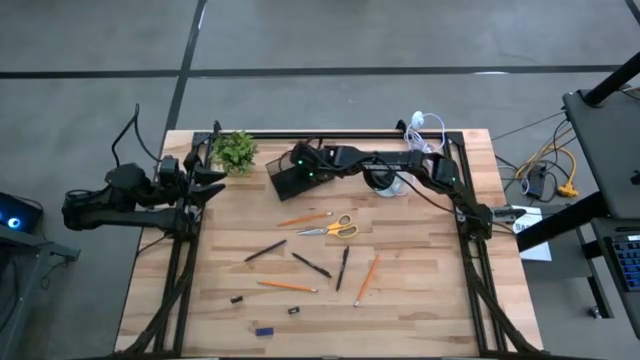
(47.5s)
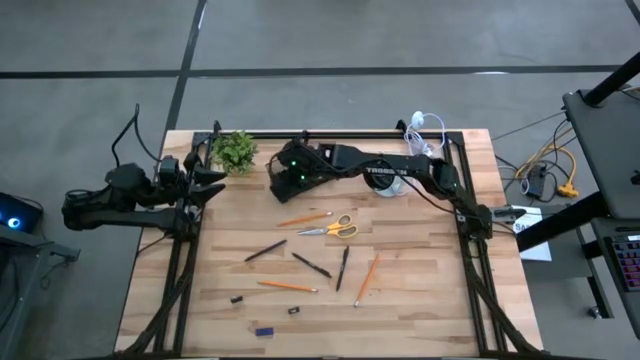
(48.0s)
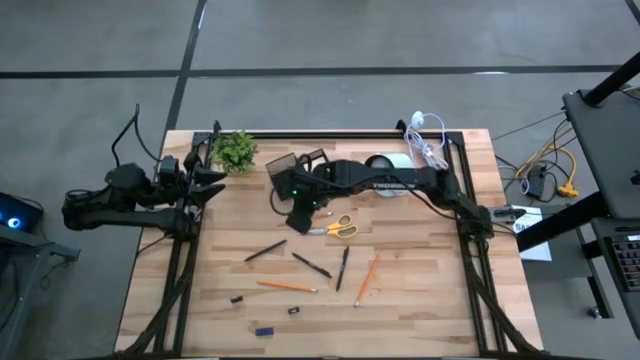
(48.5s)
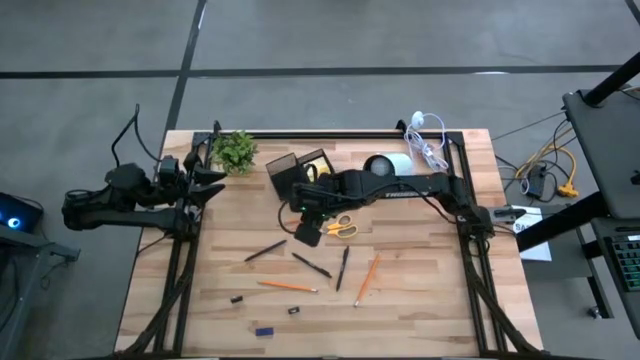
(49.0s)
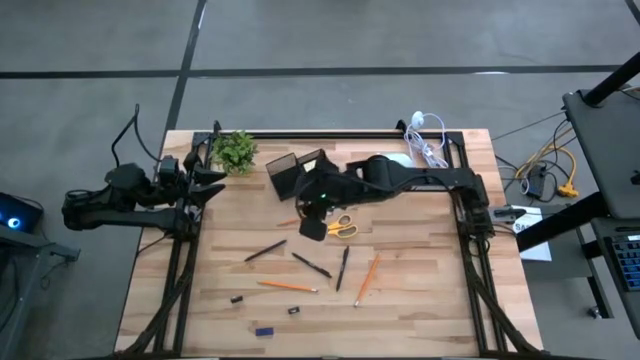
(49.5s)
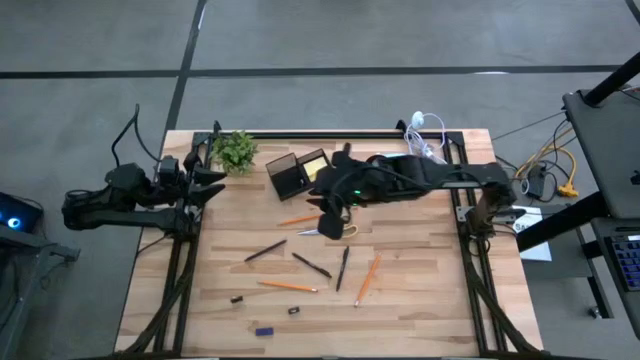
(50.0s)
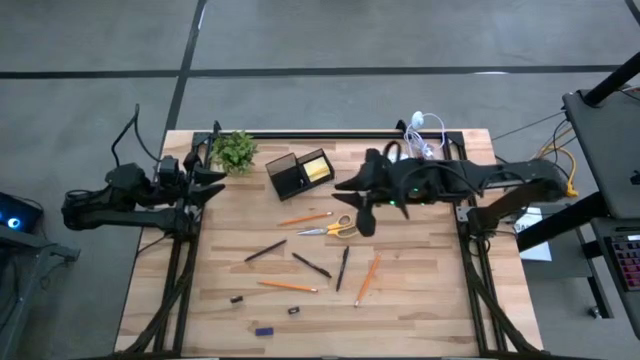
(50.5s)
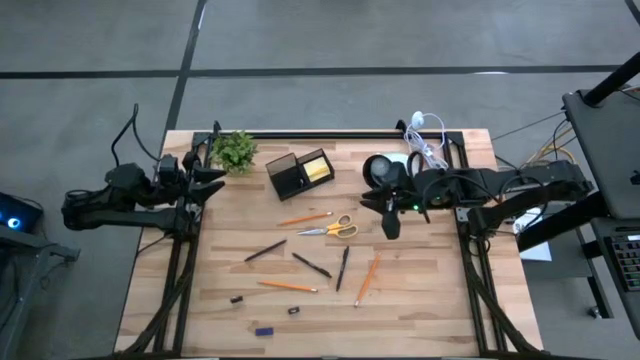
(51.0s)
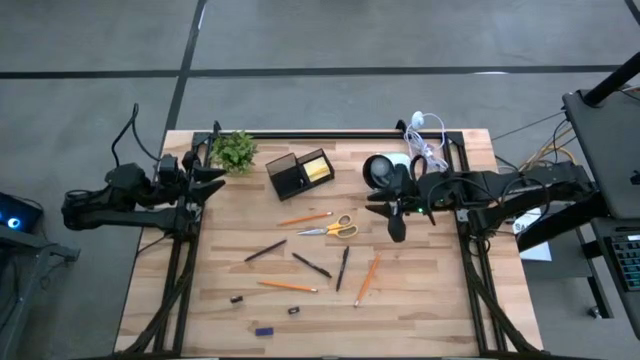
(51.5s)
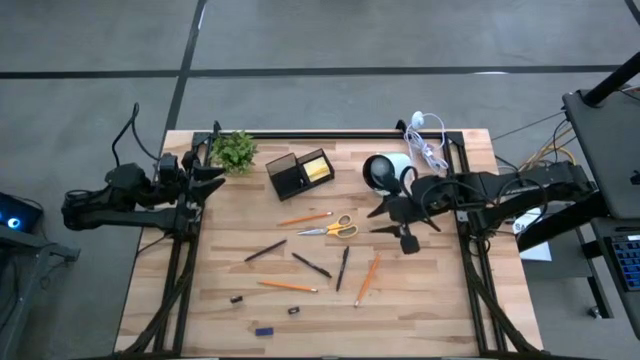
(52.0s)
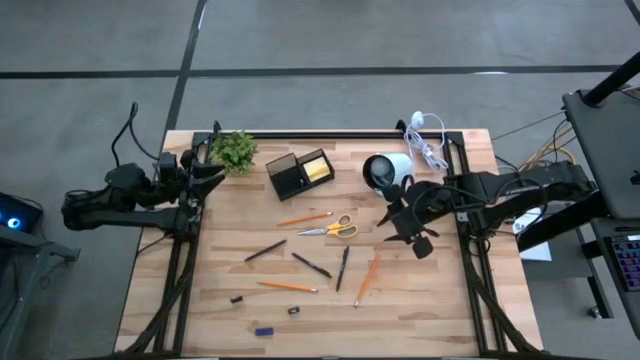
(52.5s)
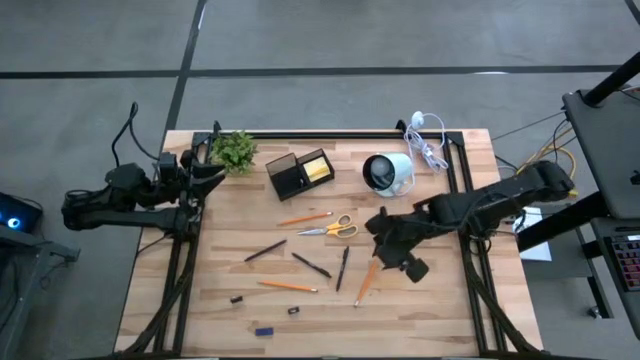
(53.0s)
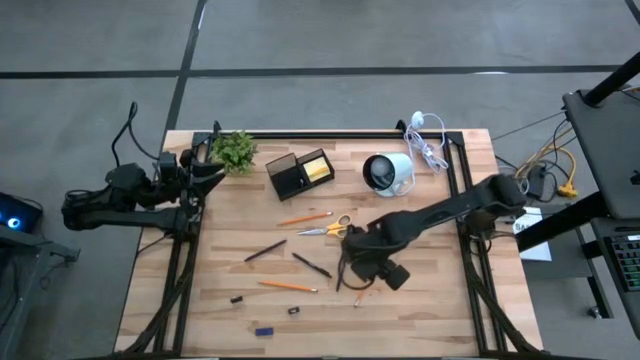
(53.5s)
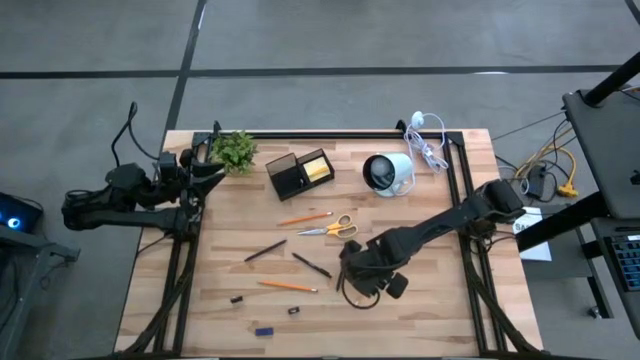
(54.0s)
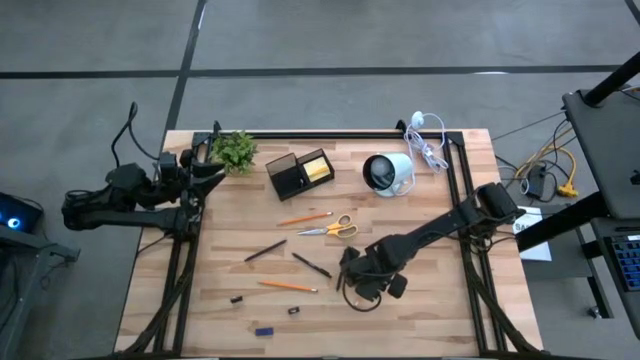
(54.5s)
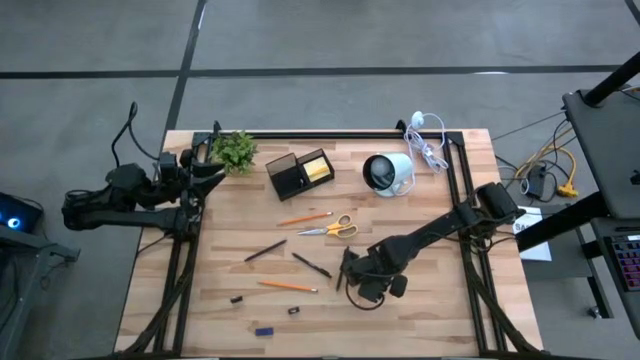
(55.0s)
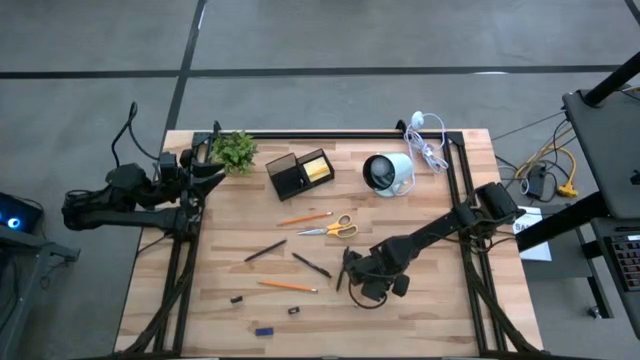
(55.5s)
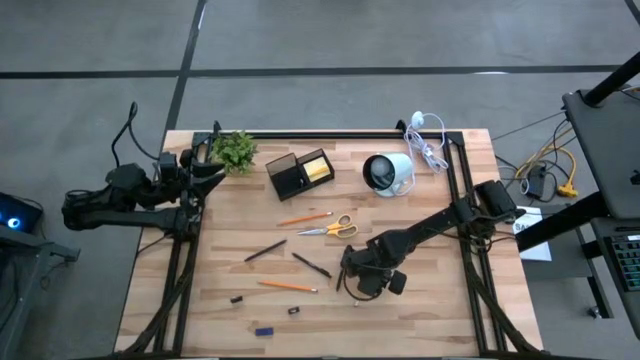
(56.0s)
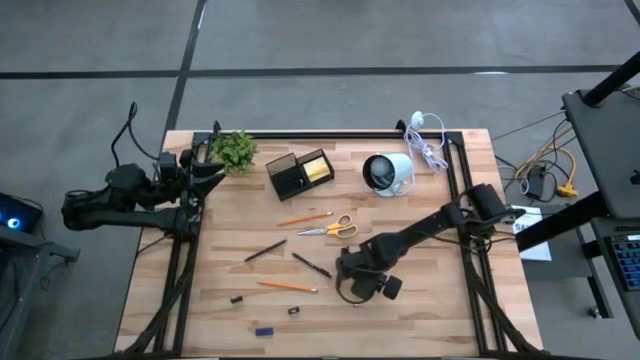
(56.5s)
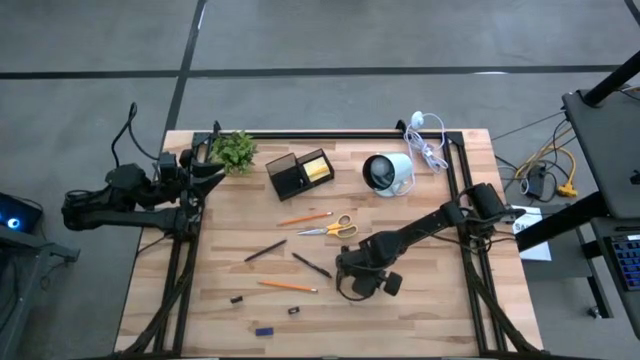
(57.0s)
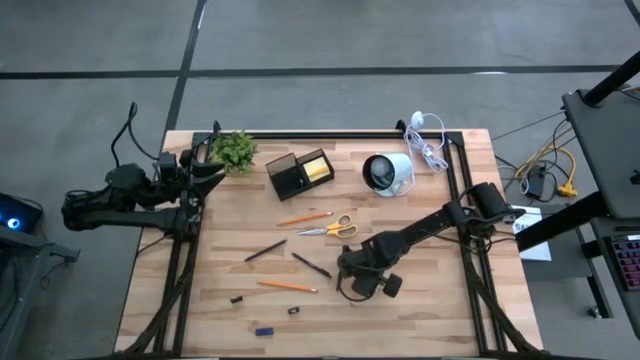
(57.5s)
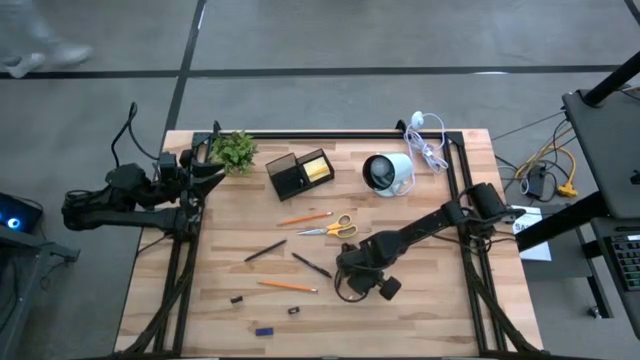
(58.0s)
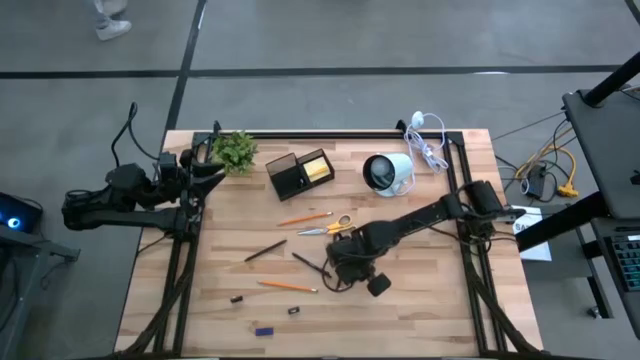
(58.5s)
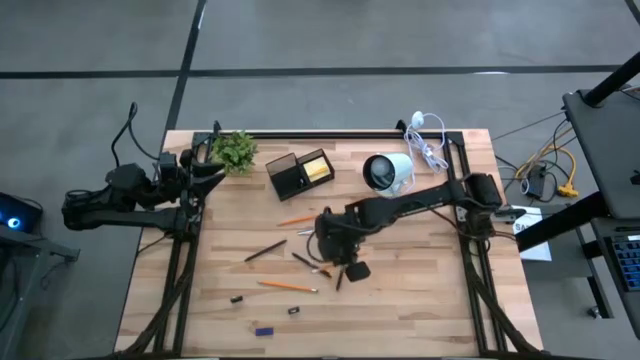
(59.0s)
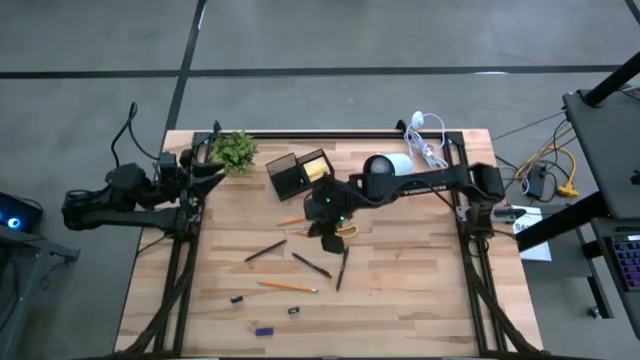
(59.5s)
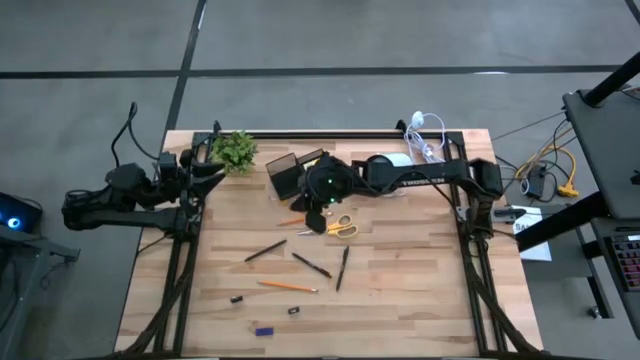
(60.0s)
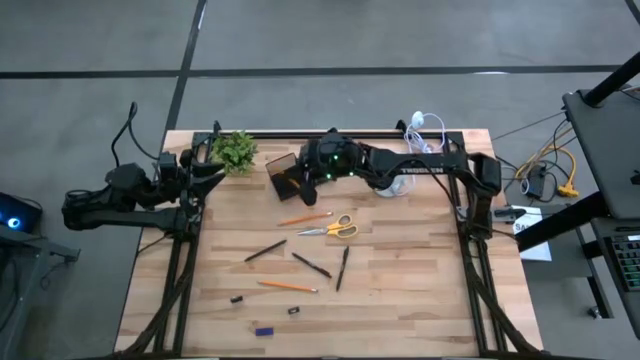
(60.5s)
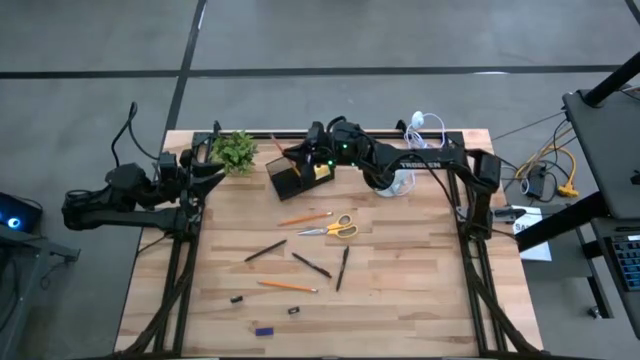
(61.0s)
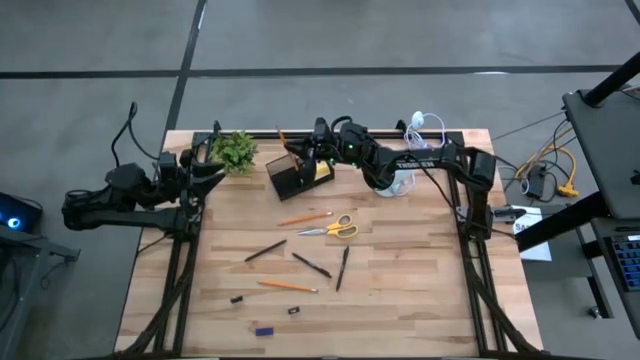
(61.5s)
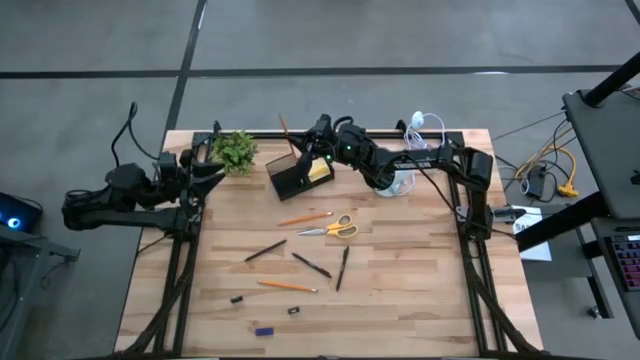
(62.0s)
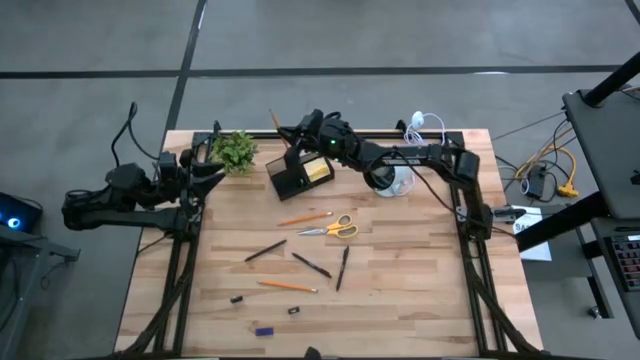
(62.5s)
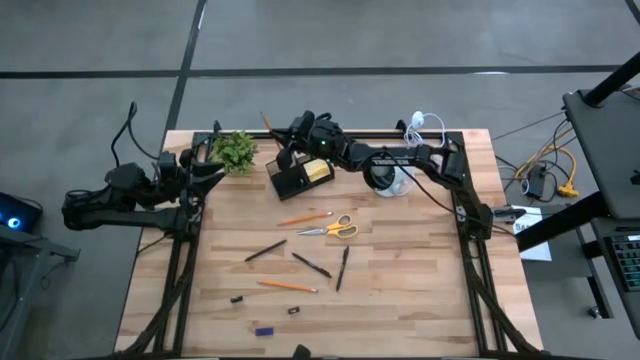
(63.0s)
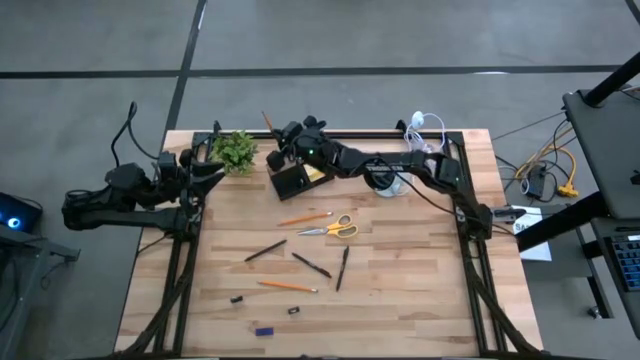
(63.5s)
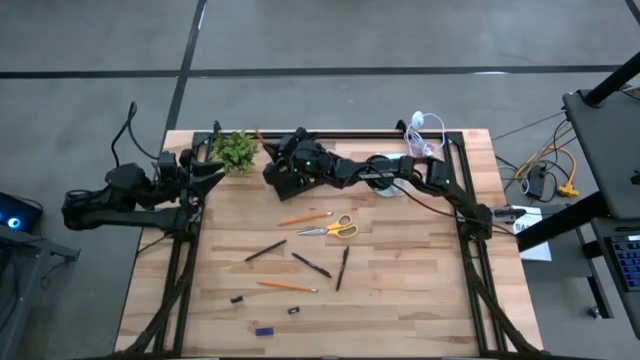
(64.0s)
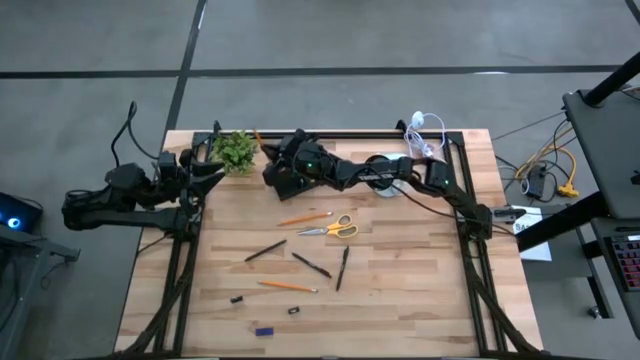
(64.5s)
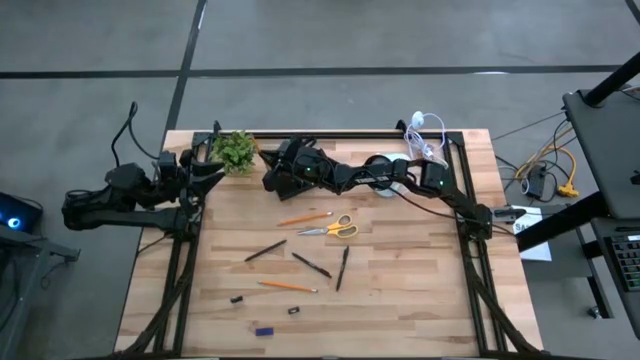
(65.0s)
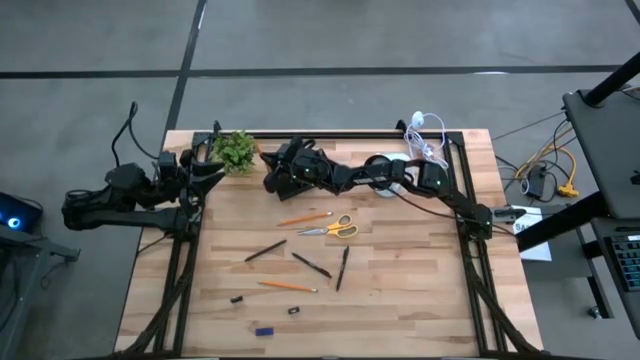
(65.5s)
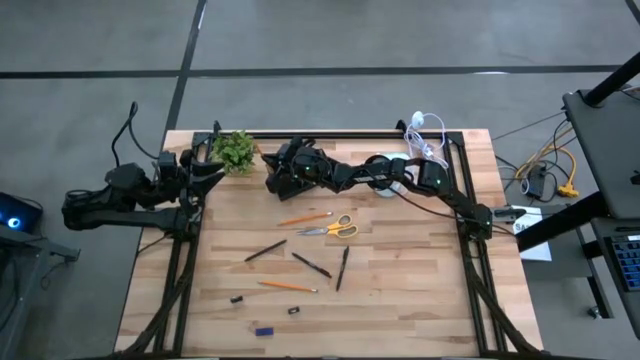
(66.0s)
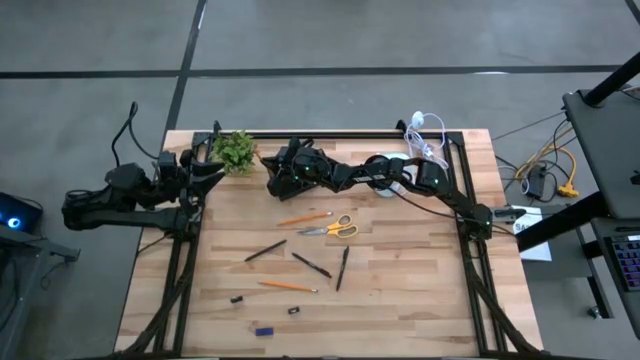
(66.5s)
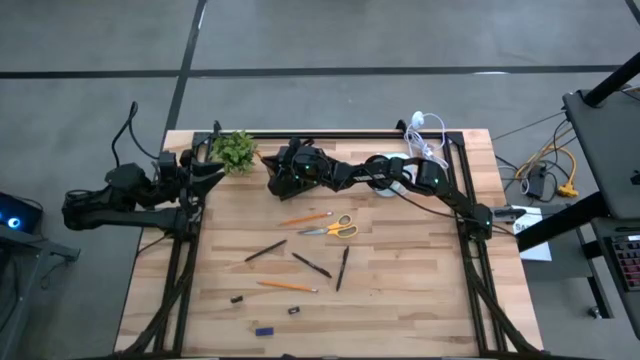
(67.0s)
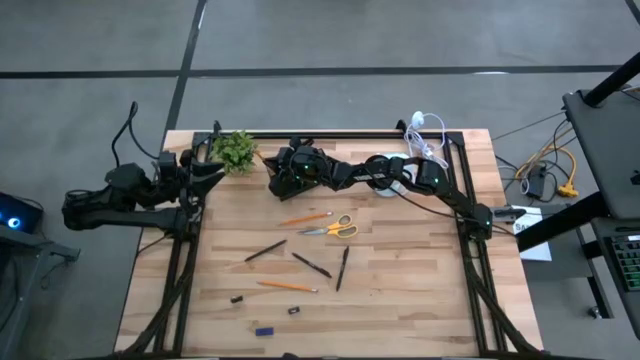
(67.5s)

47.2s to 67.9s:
Task: Pick and place office supplies into organizer
Put the bottom right yellow pencil into the black desk organizer

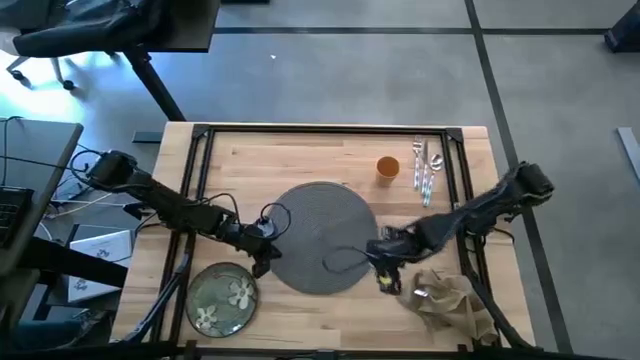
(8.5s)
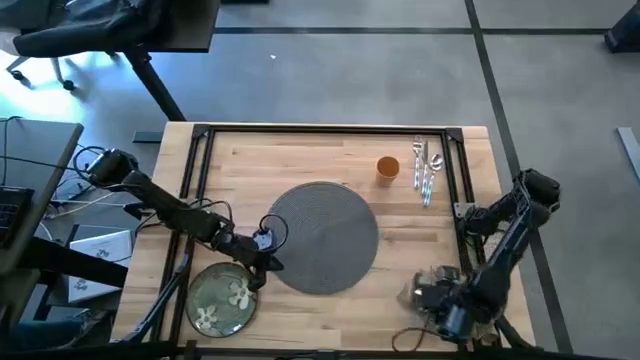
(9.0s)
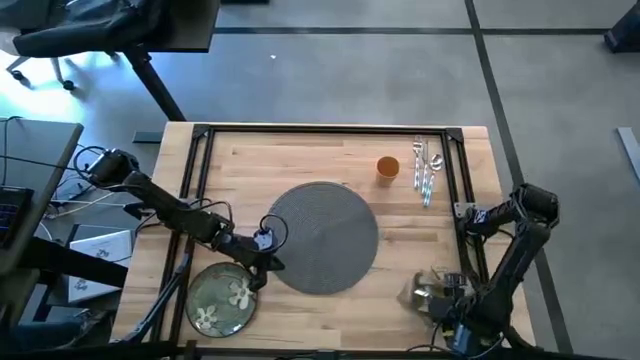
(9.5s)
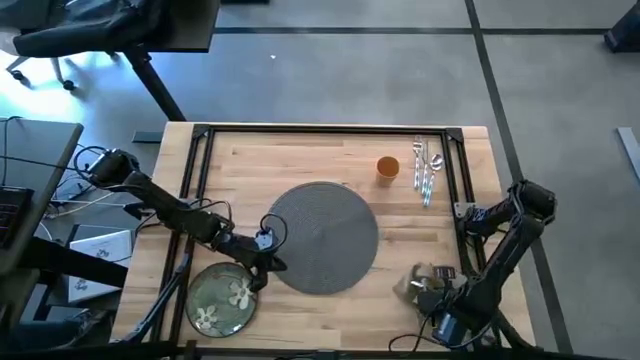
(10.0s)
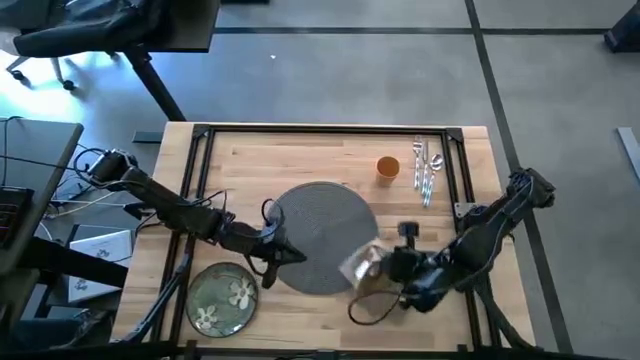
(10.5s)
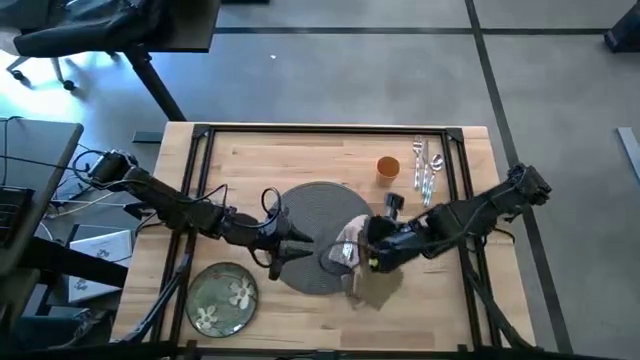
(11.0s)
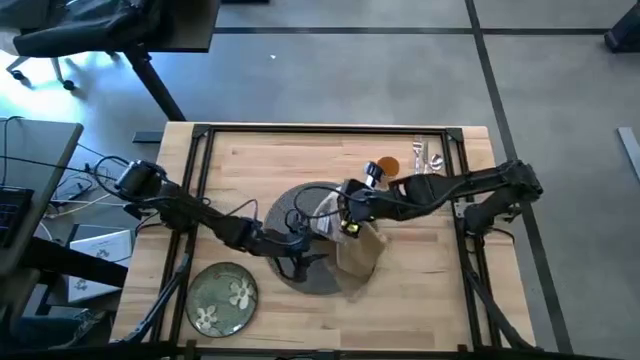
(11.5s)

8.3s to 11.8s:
Task: Set table place
Fold the brown napkin
